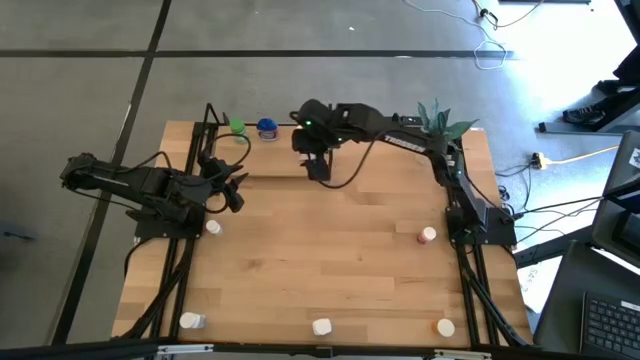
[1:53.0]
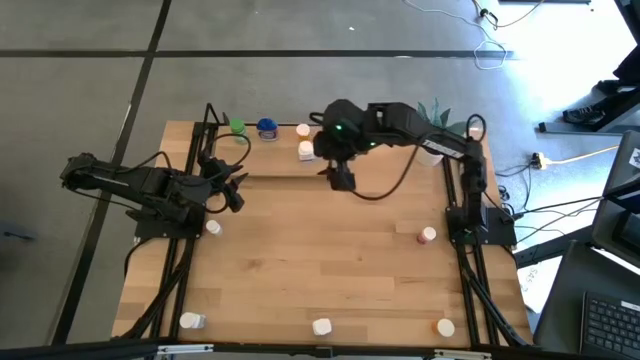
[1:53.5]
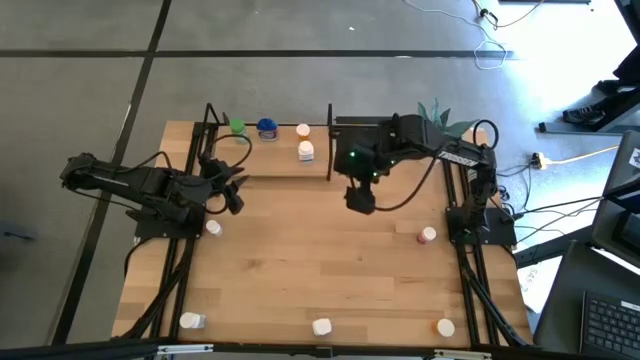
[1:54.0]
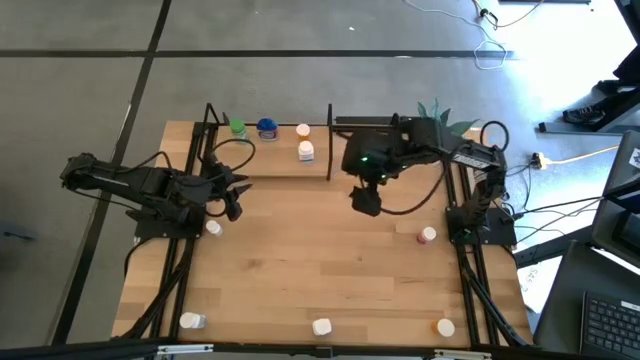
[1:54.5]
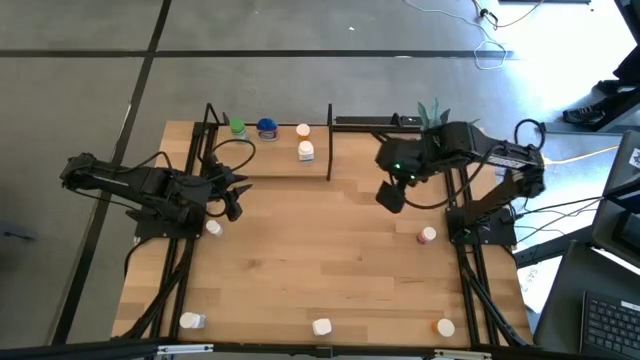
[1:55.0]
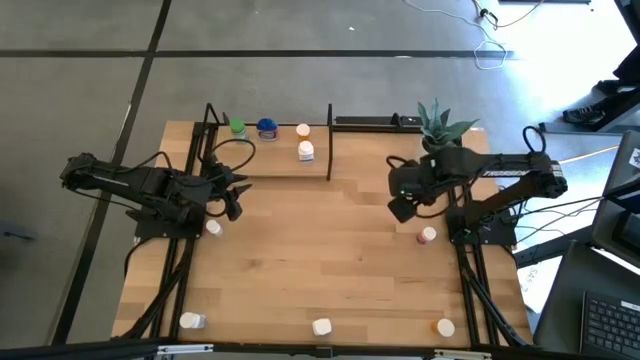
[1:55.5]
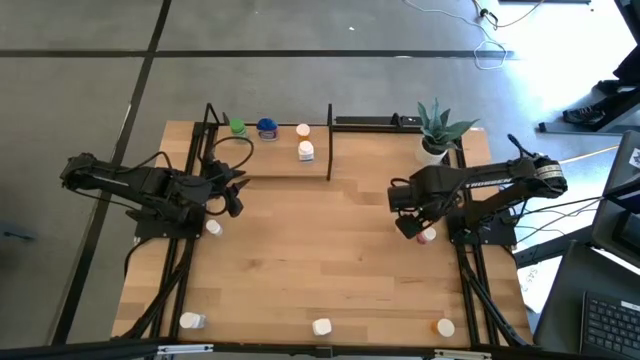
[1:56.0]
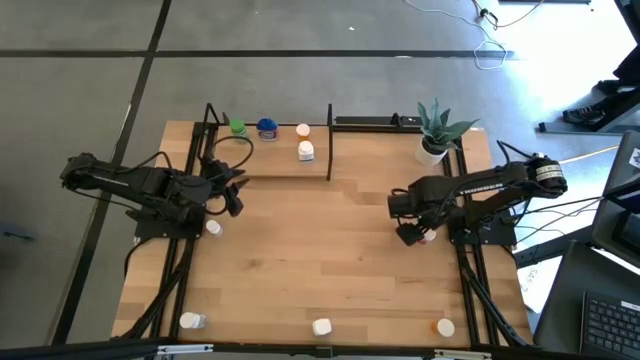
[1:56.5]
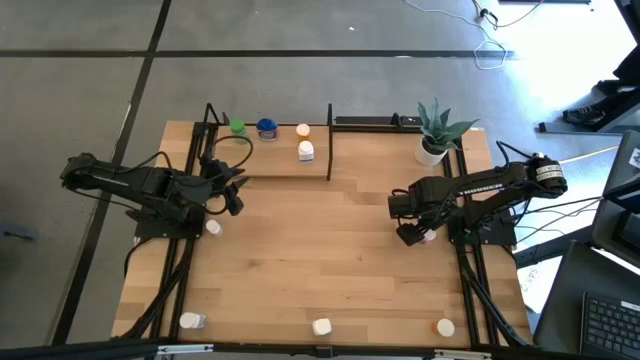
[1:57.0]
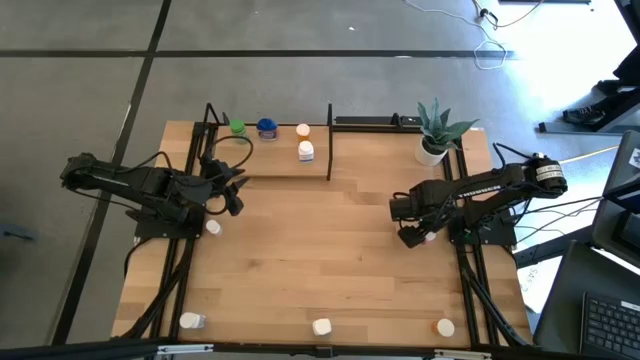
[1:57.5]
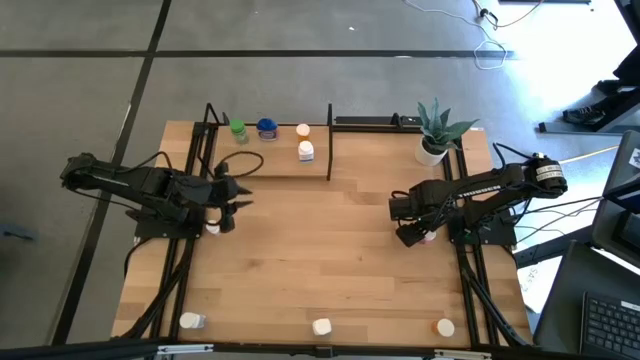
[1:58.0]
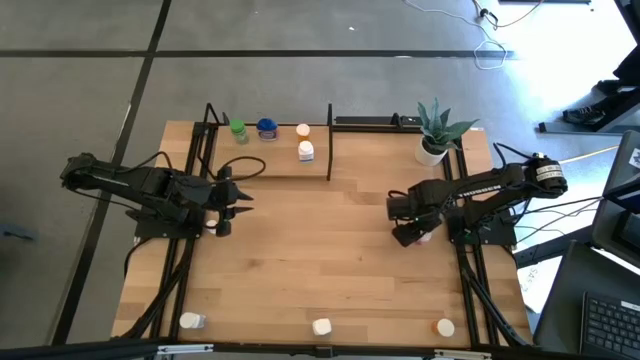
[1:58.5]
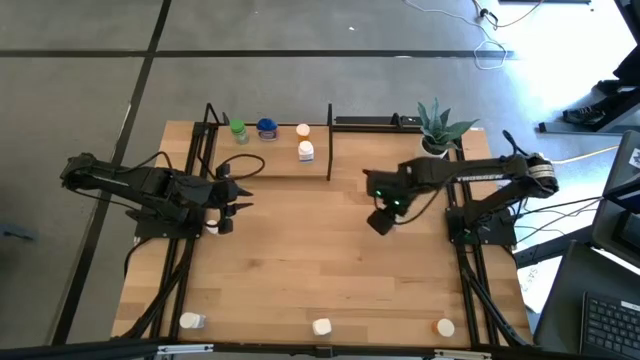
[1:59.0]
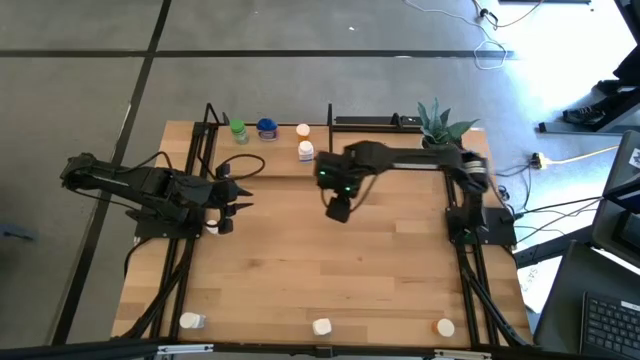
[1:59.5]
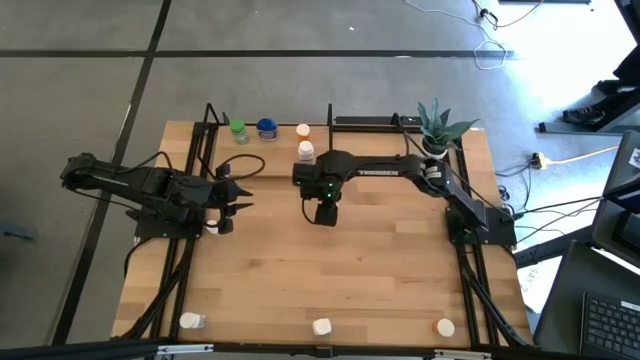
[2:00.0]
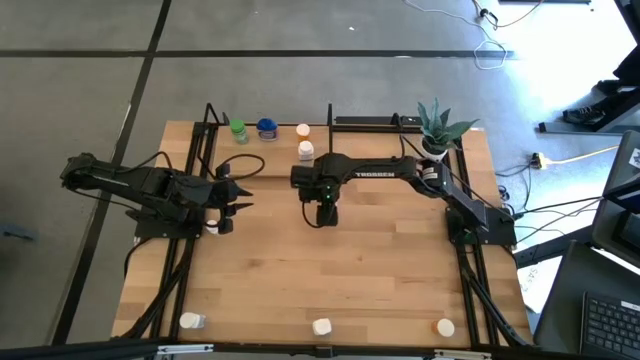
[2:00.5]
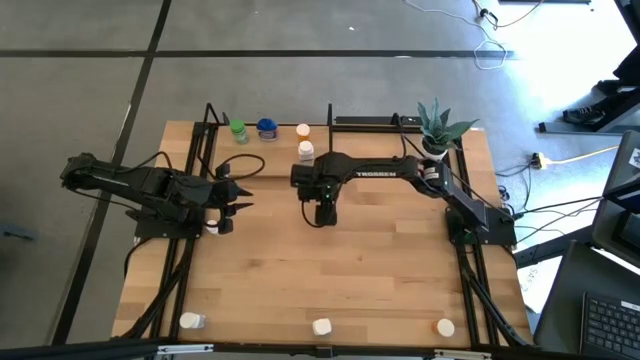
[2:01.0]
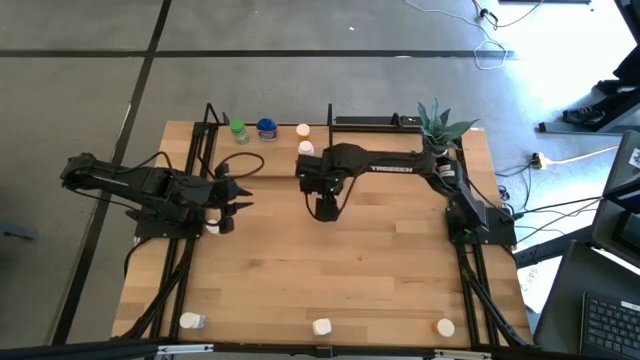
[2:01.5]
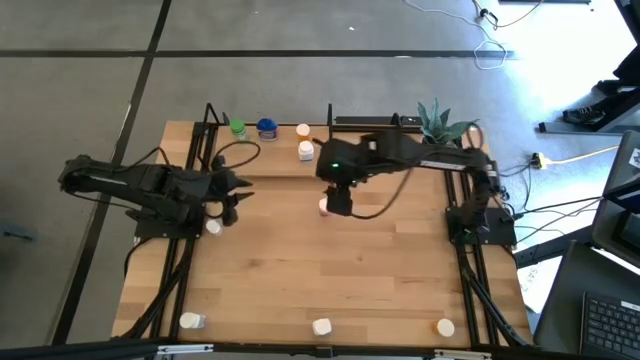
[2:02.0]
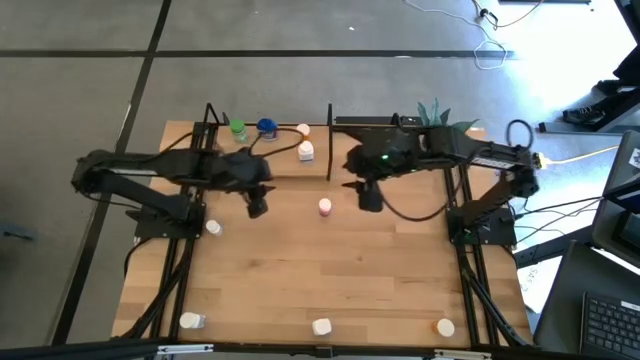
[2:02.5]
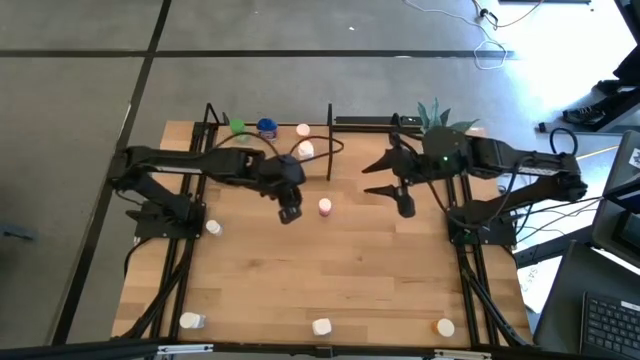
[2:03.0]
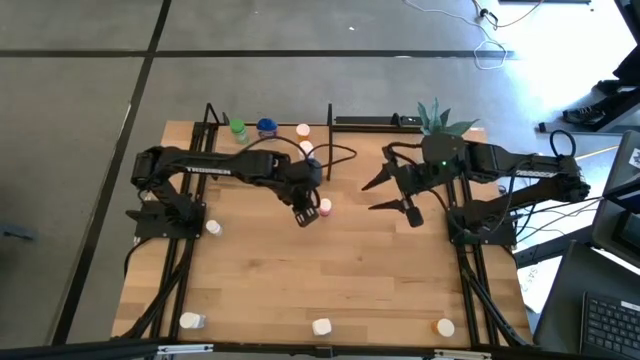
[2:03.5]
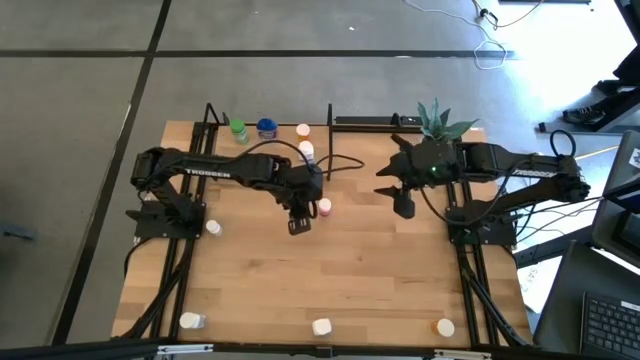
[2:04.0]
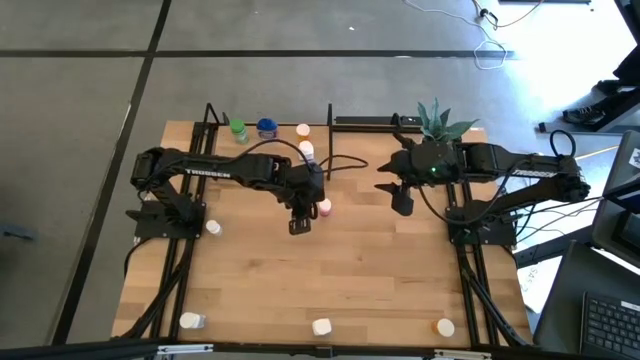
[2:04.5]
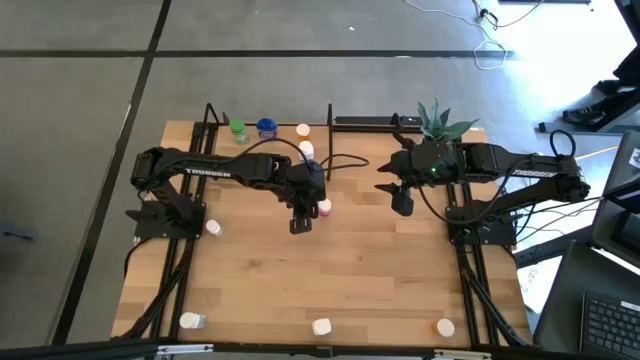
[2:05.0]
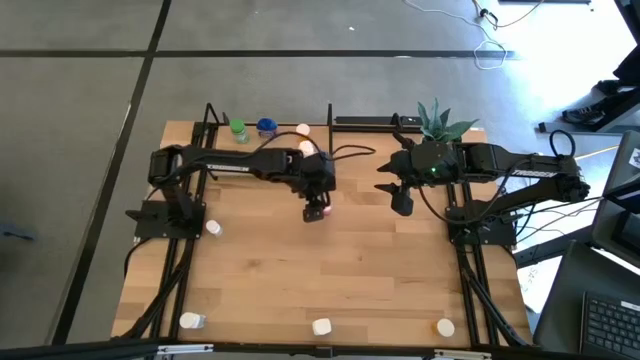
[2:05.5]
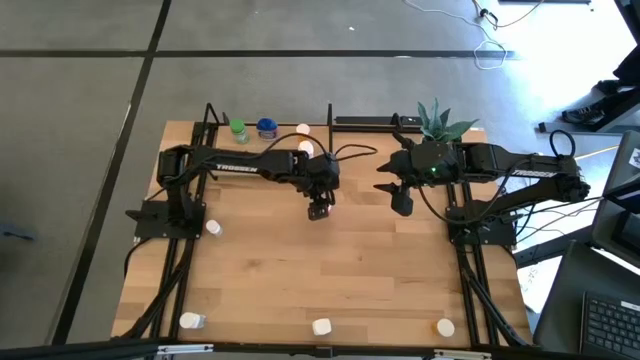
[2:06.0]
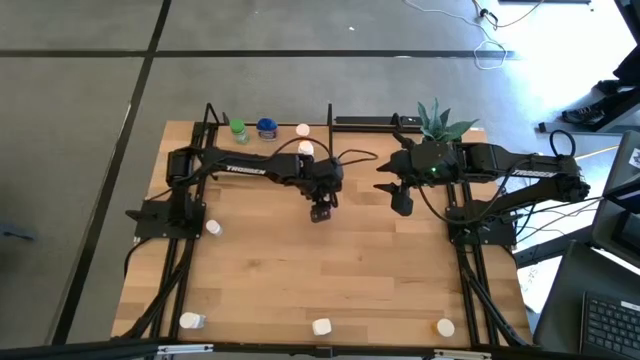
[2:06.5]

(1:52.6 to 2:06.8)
Task: Pick and place medicine bottles onto shelf by color
Put the pink pill bottle on the shelf
